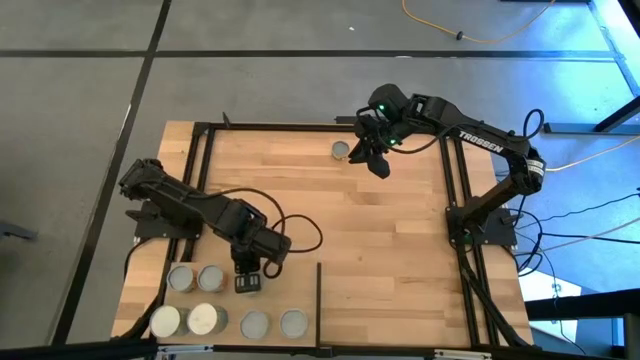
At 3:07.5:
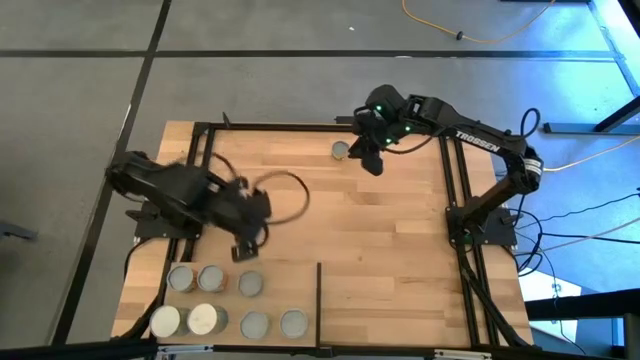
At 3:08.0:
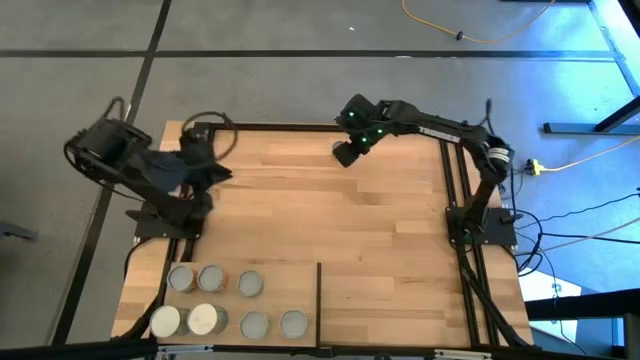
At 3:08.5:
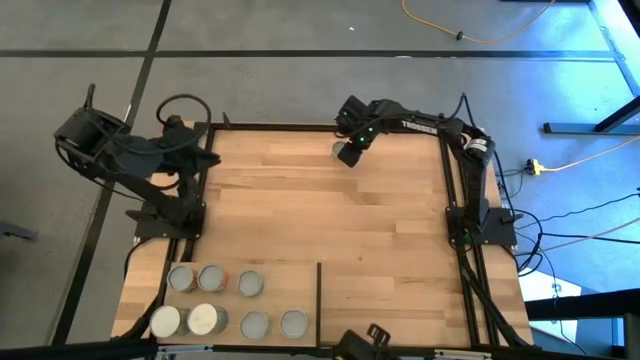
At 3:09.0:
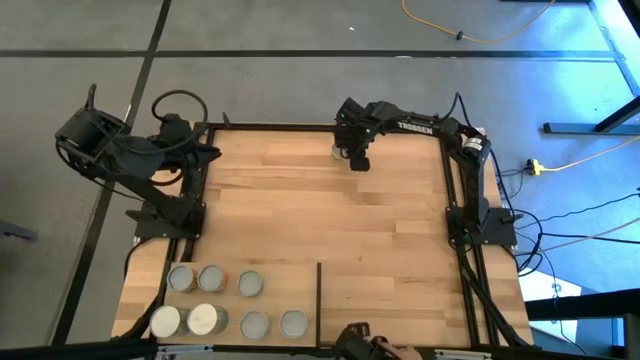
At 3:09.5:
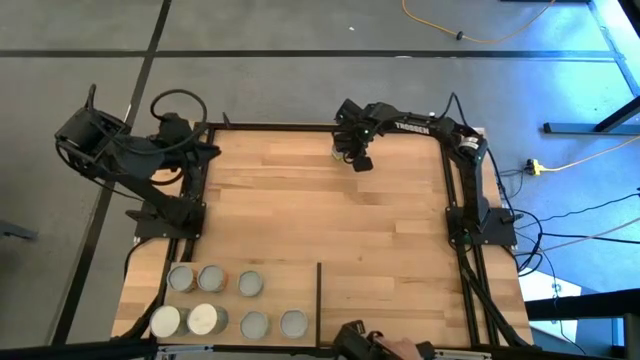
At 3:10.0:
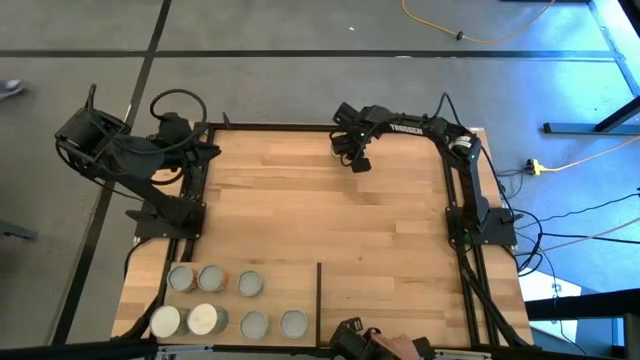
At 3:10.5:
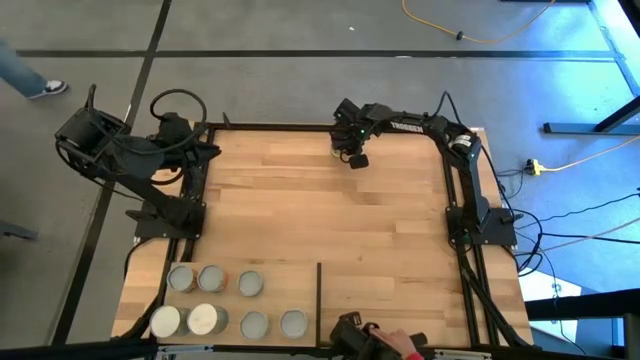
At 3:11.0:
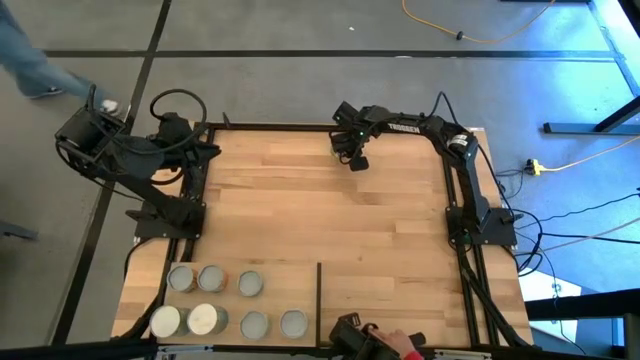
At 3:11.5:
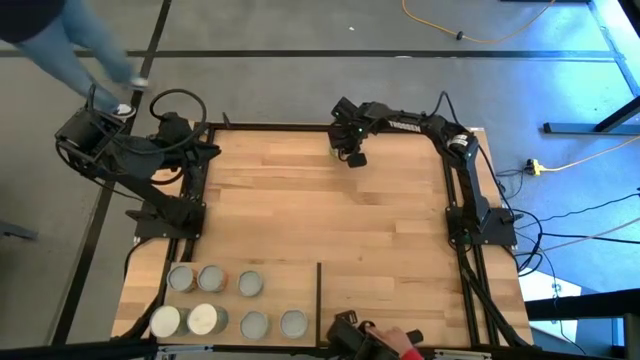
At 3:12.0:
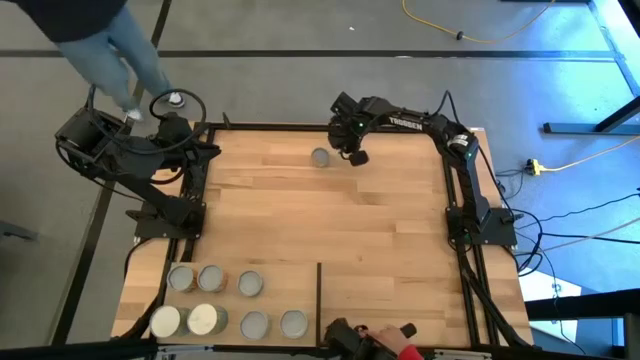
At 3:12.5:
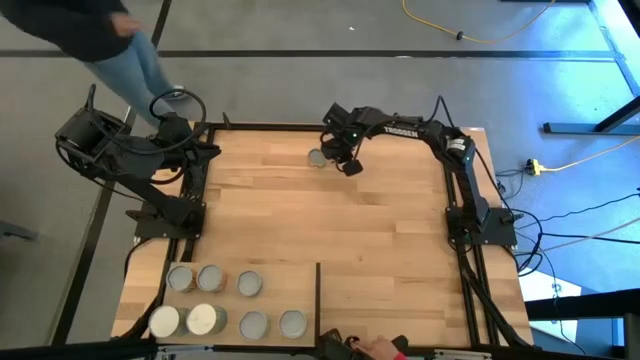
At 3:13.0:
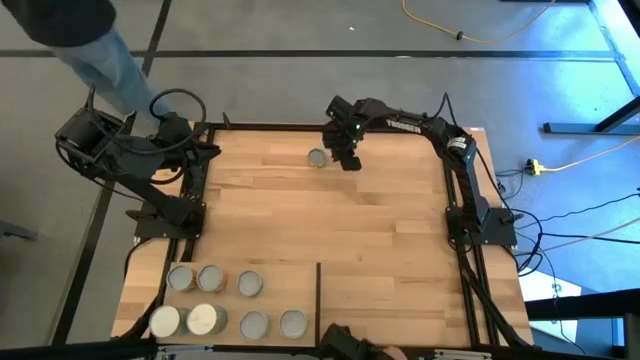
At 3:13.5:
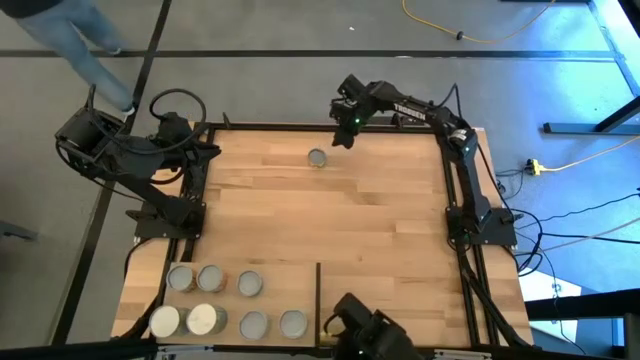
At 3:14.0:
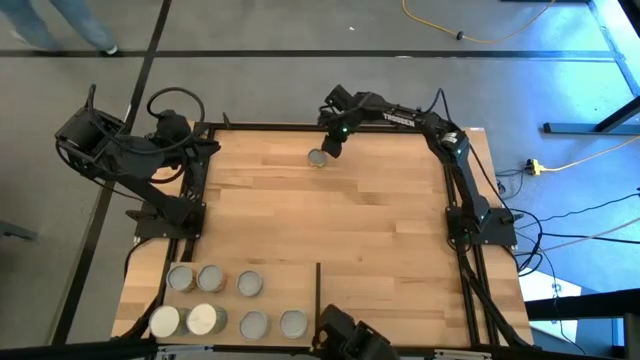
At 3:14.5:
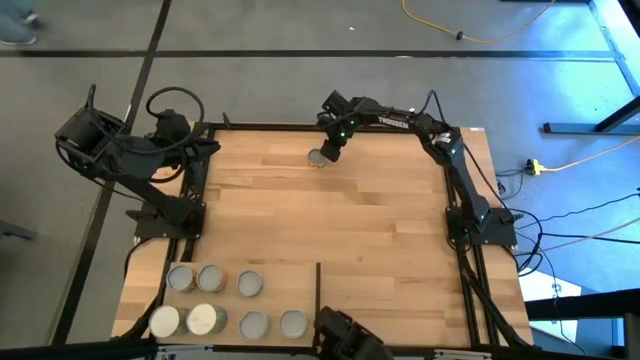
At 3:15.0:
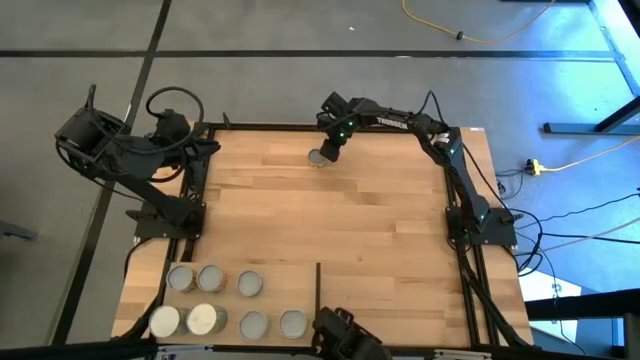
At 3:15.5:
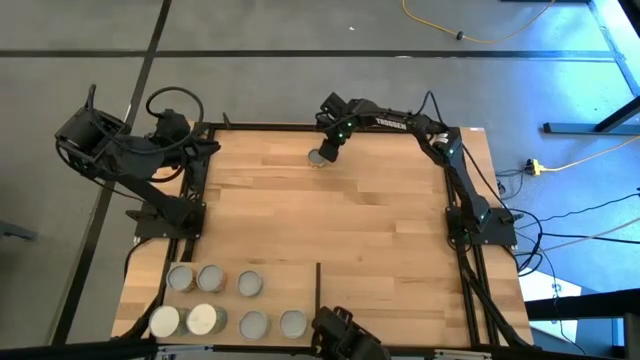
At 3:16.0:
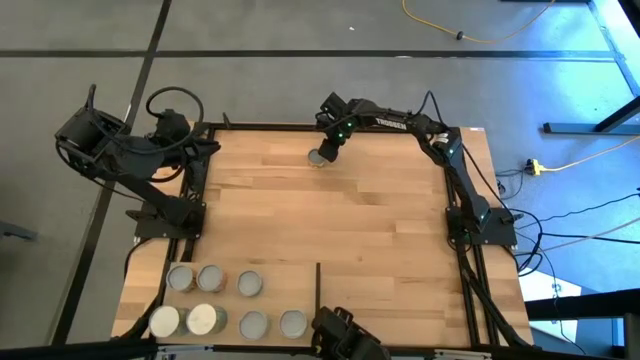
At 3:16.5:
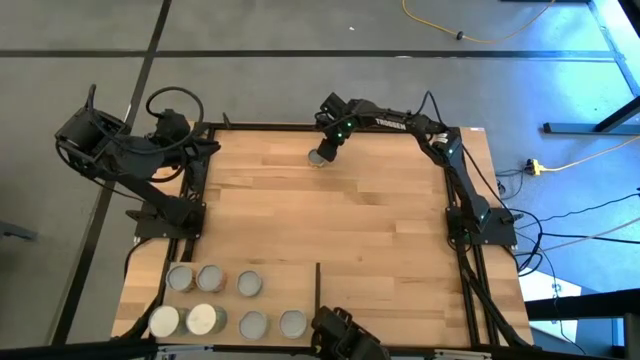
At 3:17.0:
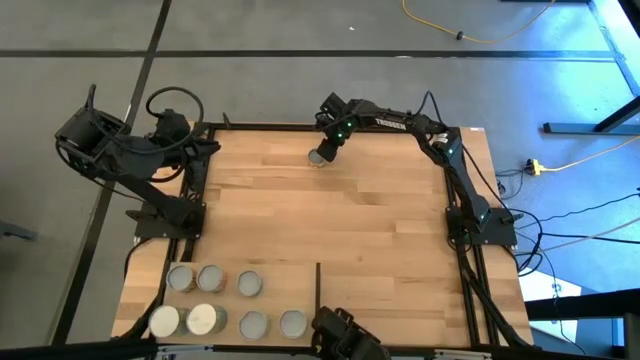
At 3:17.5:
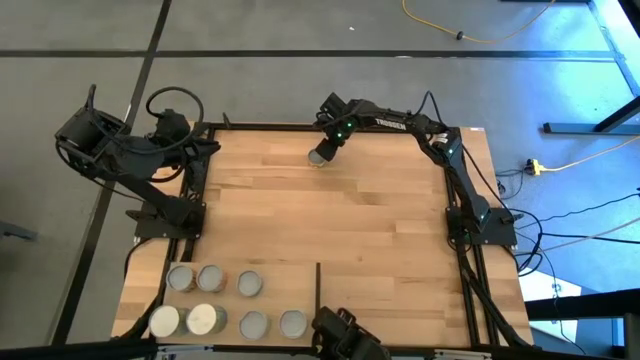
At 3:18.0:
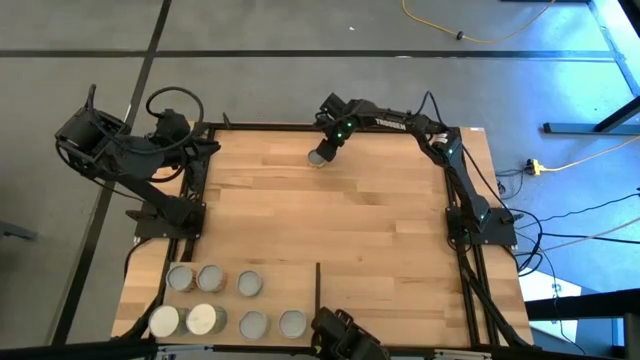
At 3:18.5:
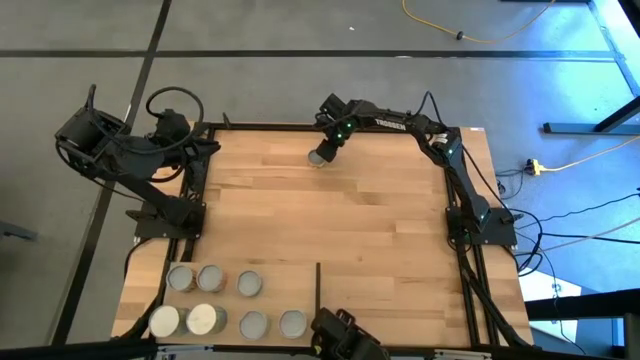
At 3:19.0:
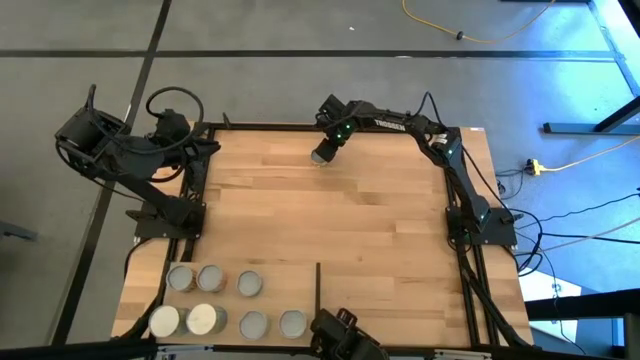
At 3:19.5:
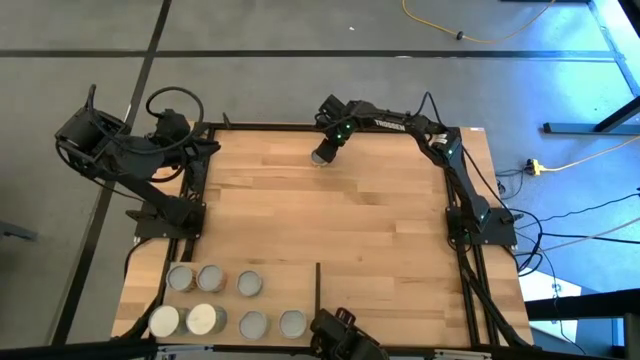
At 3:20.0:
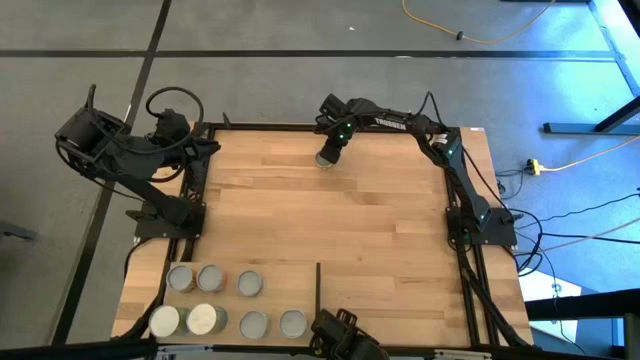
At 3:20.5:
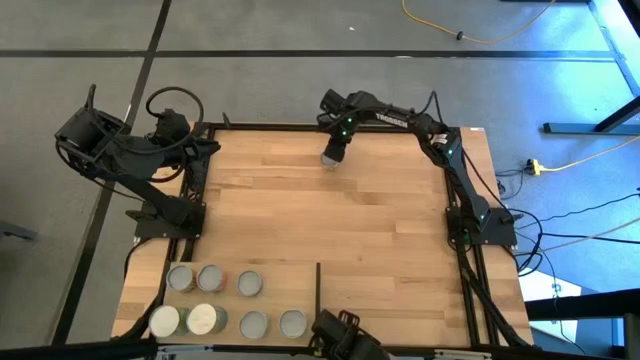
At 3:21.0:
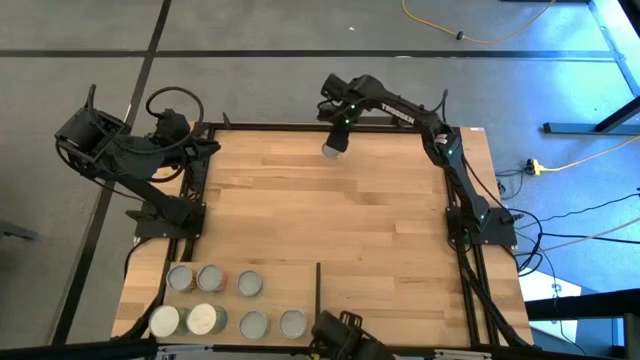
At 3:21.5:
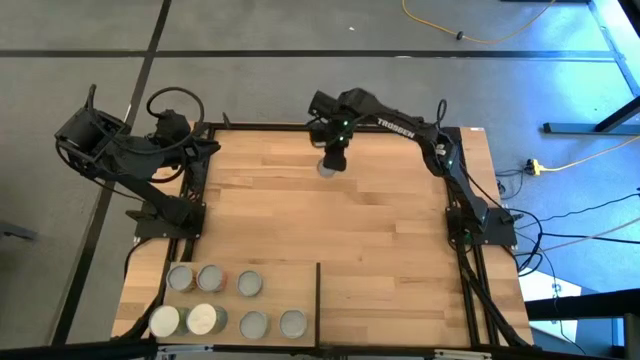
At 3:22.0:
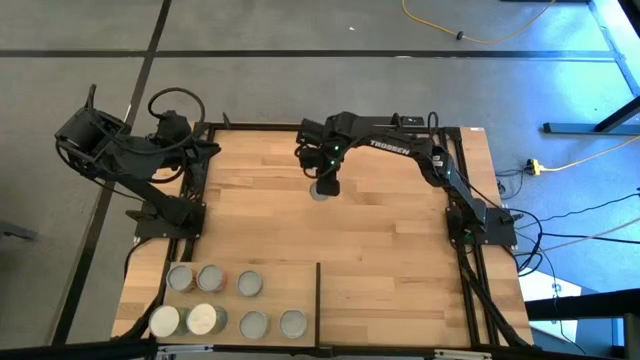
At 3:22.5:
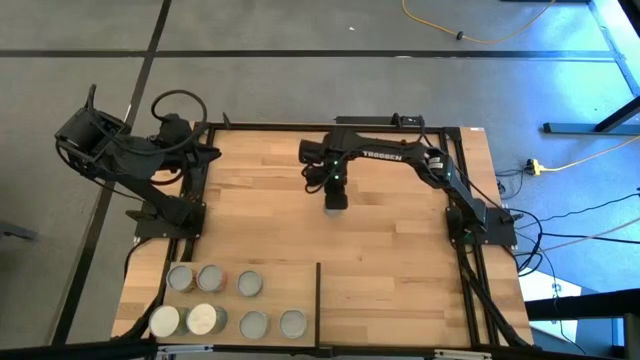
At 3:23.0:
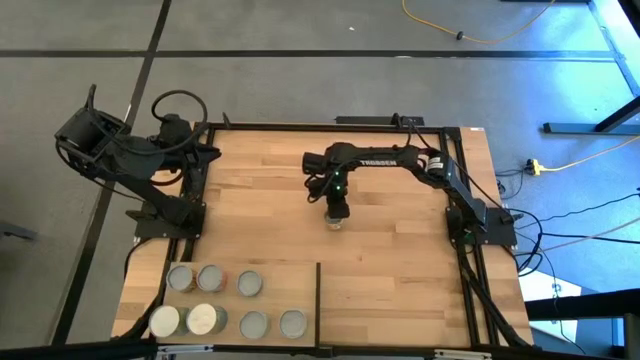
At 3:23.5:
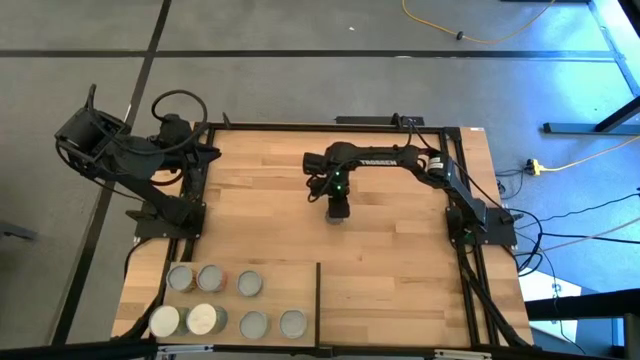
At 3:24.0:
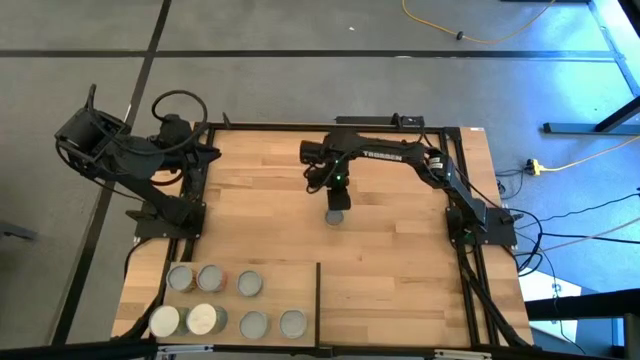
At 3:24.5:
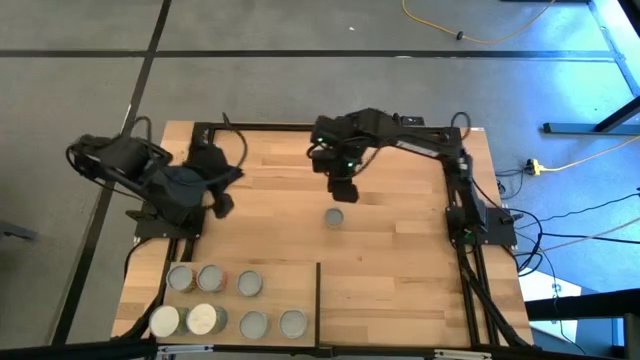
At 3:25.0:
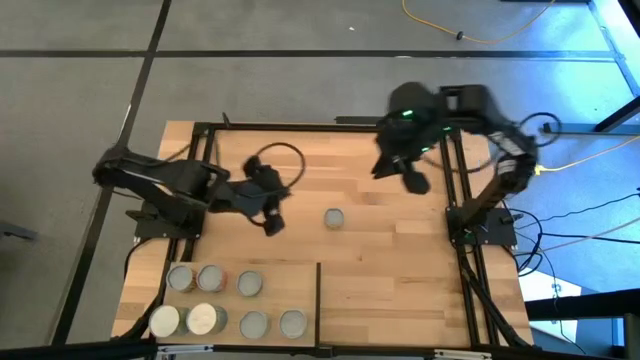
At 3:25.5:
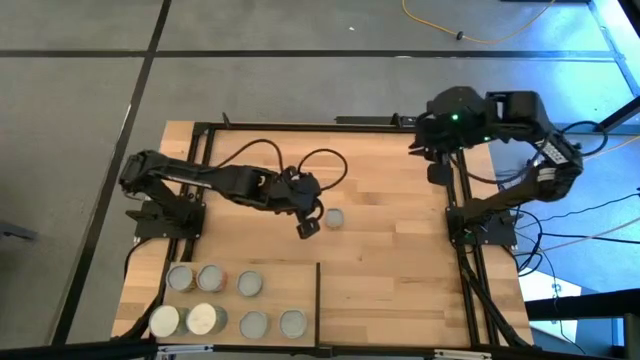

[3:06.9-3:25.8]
Task: Pick and place cans onto a shelf
Return to Home Position

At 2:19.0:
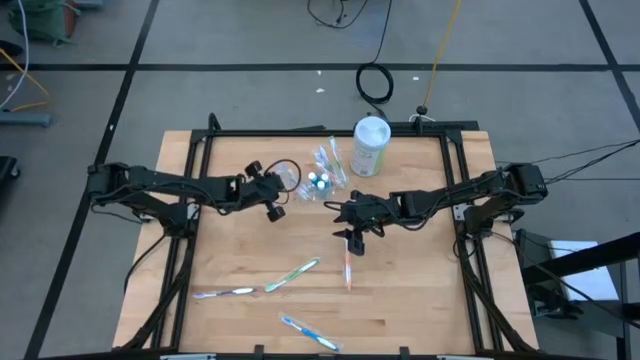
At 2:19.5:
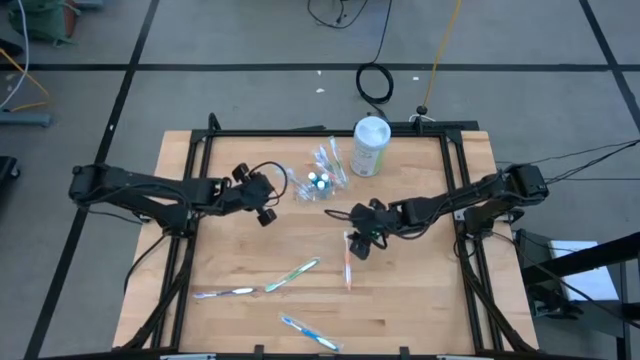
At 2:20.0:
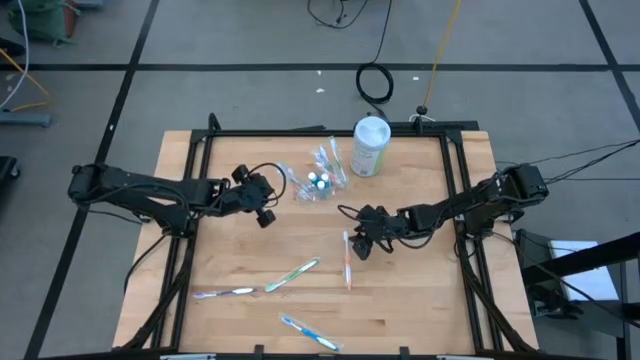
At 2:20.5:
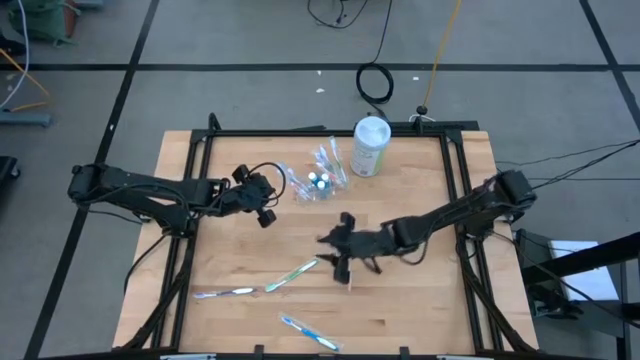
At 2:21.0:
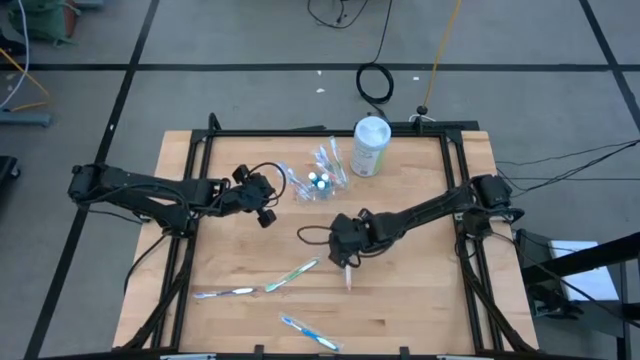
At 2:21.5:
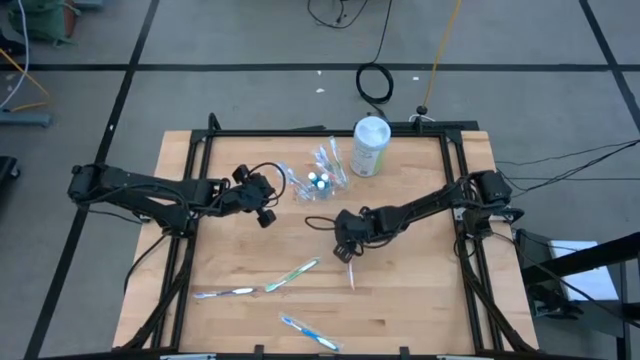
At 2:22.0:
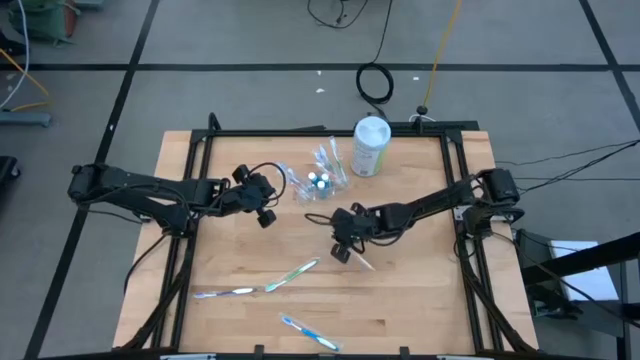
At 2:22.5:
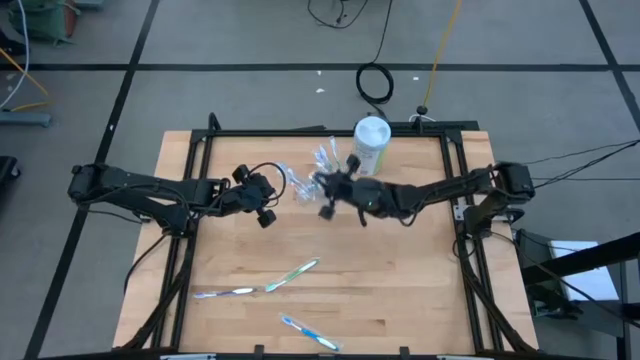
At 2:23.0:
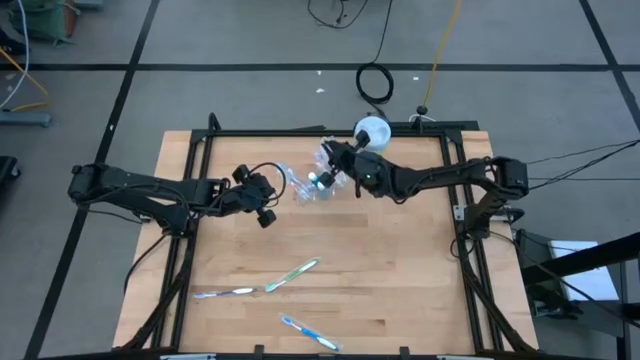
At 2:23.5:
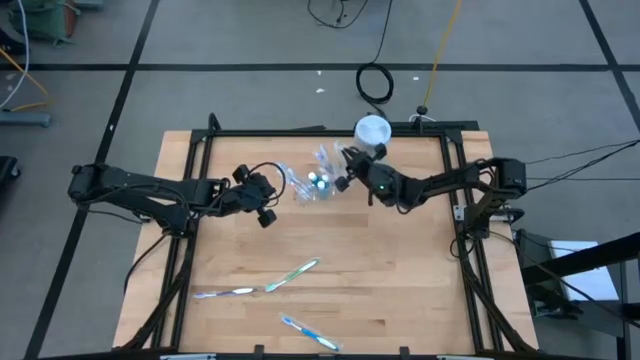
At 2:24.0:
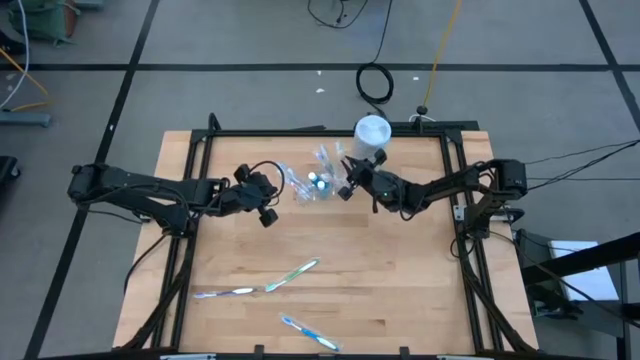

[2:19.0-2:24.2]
Task: Pick & Place toothbrushing station
Put the orange toothbrush into the transparent organizer
